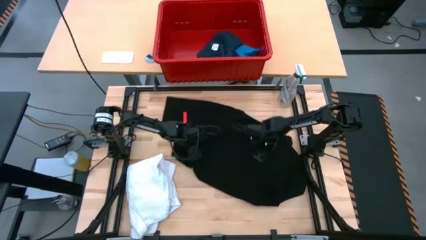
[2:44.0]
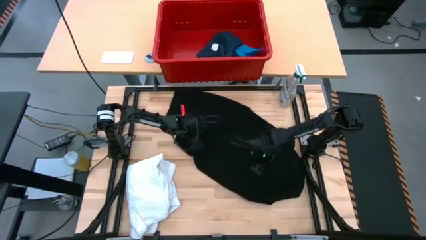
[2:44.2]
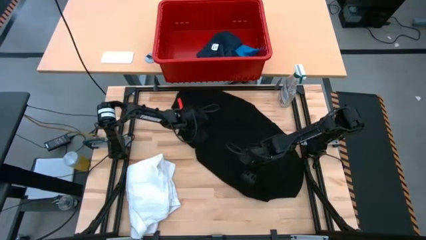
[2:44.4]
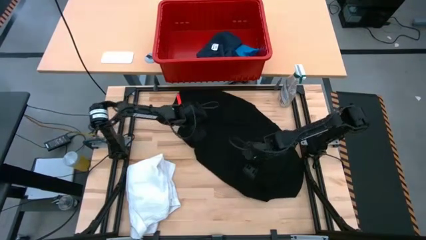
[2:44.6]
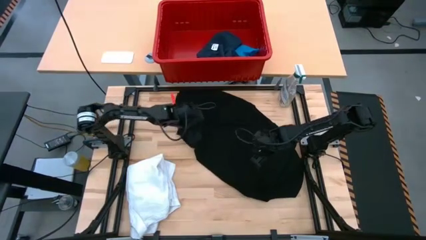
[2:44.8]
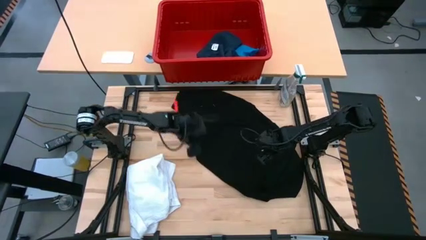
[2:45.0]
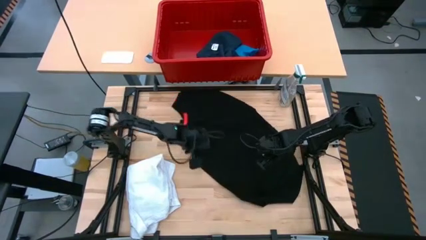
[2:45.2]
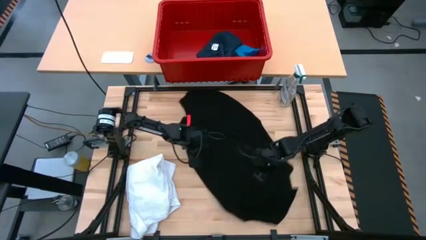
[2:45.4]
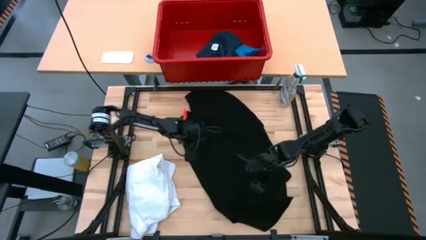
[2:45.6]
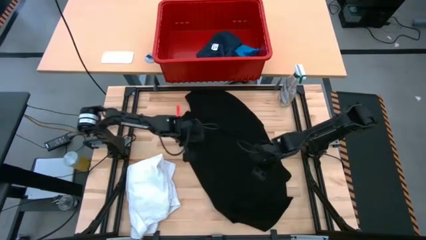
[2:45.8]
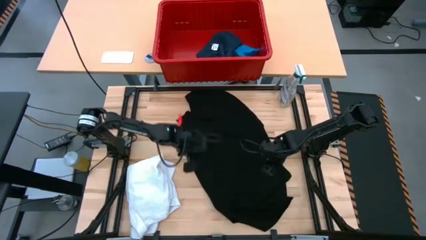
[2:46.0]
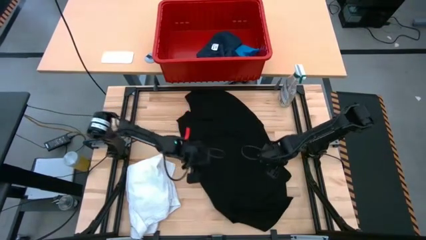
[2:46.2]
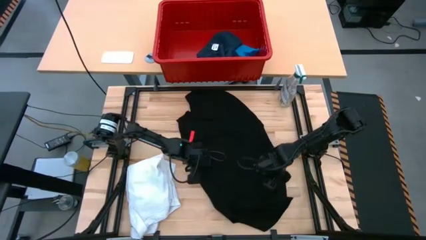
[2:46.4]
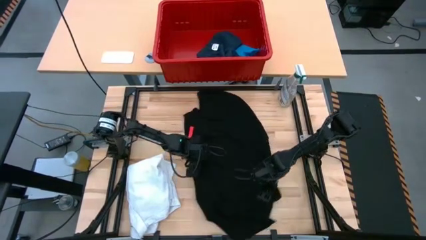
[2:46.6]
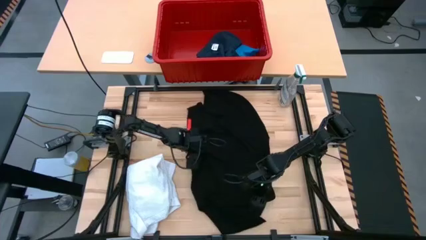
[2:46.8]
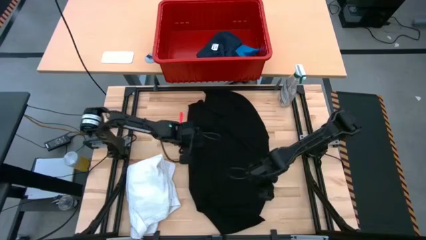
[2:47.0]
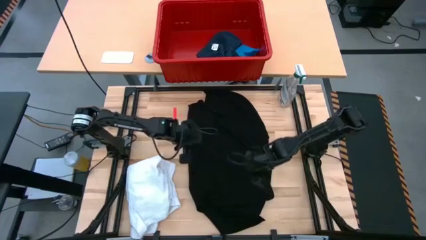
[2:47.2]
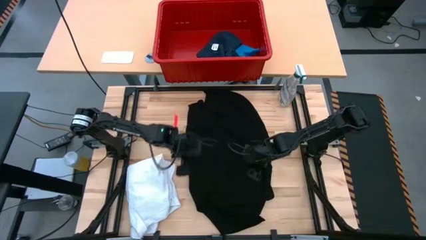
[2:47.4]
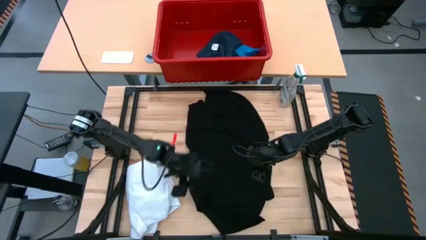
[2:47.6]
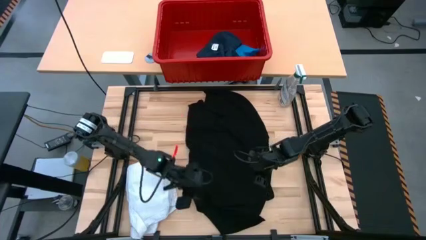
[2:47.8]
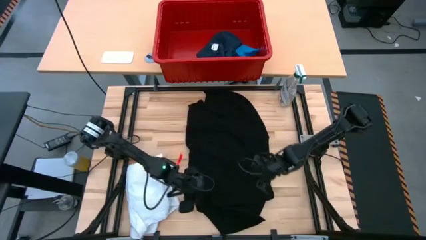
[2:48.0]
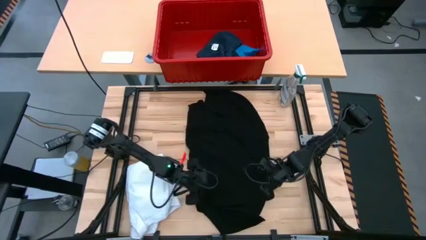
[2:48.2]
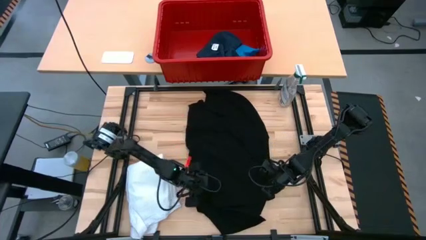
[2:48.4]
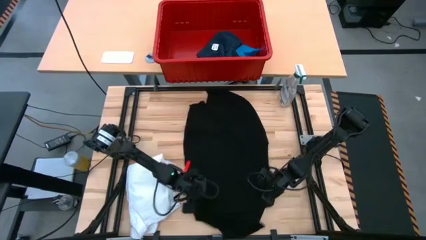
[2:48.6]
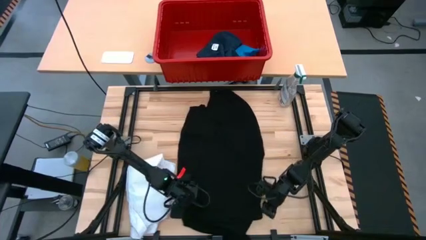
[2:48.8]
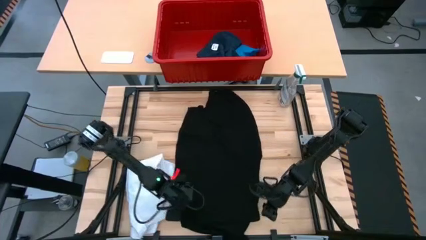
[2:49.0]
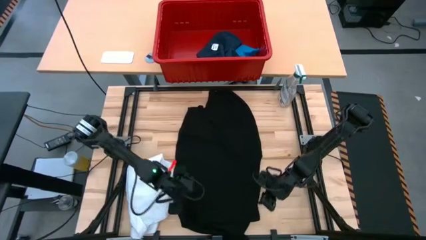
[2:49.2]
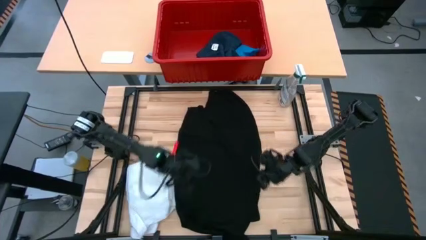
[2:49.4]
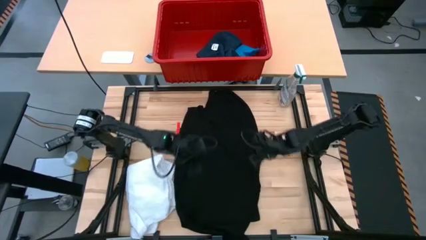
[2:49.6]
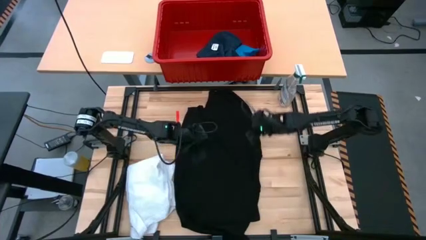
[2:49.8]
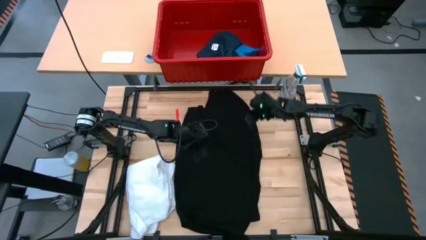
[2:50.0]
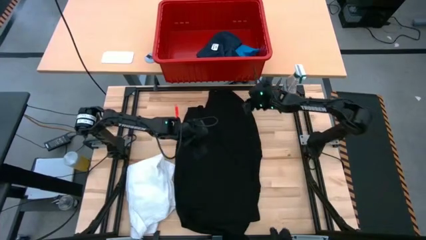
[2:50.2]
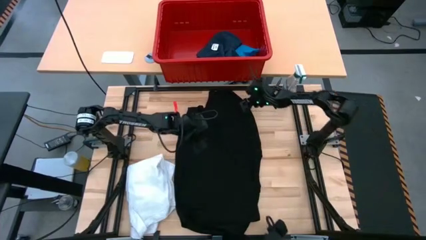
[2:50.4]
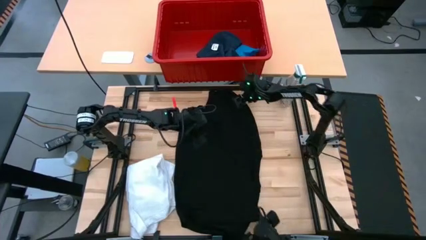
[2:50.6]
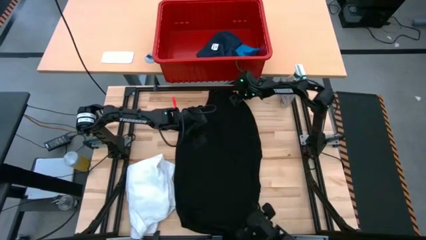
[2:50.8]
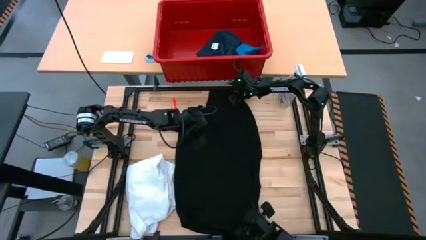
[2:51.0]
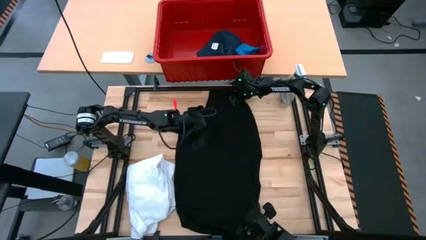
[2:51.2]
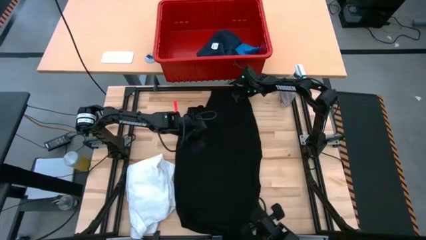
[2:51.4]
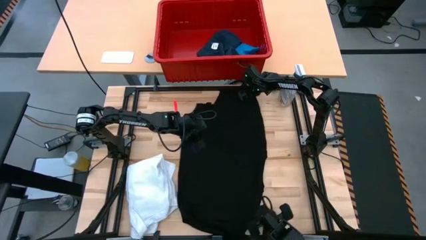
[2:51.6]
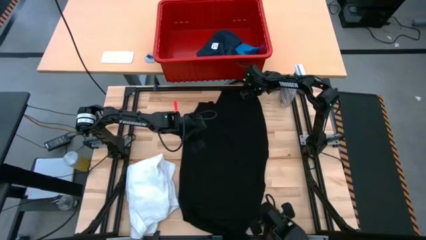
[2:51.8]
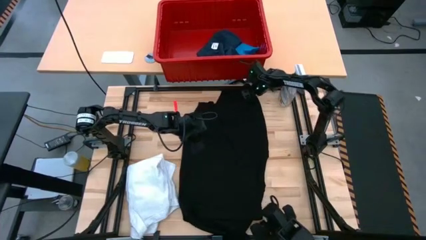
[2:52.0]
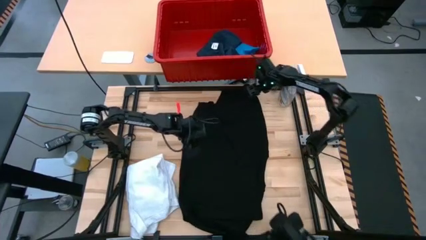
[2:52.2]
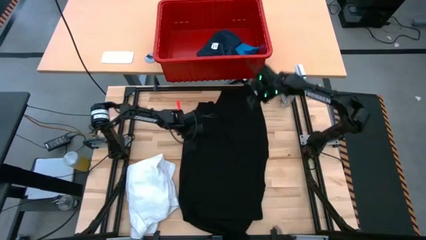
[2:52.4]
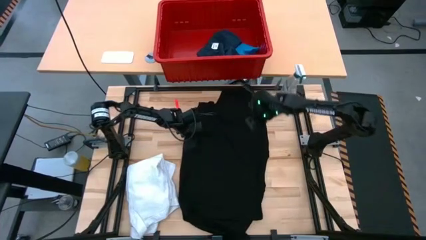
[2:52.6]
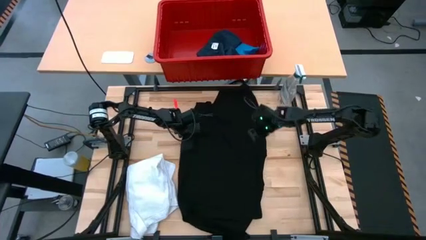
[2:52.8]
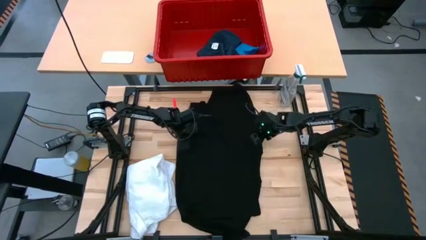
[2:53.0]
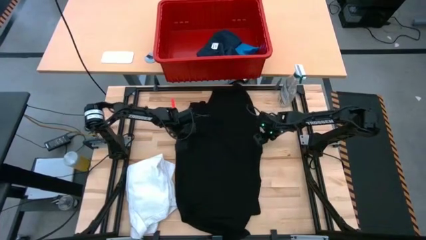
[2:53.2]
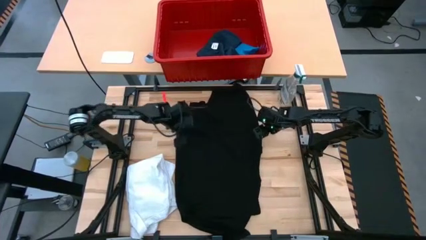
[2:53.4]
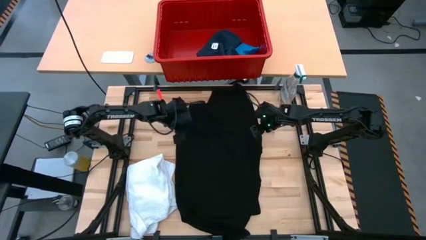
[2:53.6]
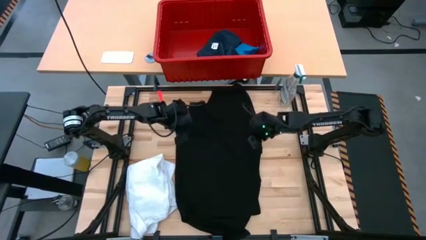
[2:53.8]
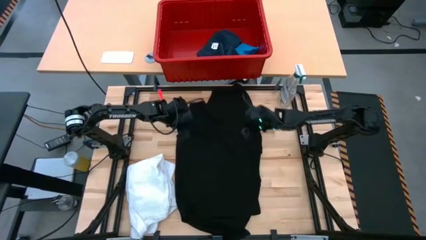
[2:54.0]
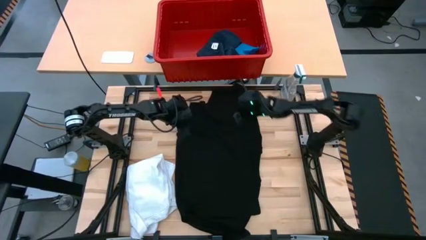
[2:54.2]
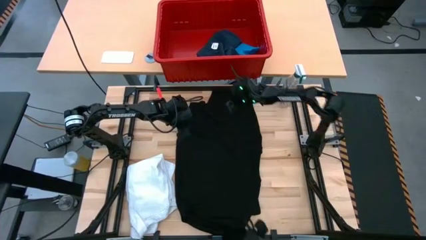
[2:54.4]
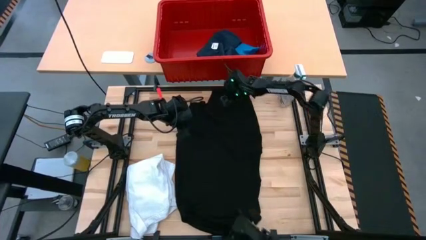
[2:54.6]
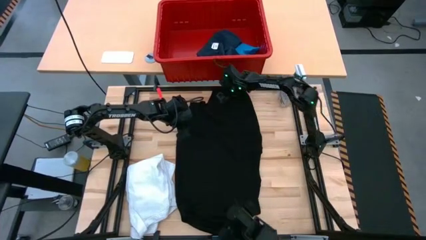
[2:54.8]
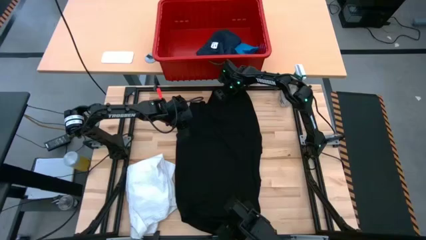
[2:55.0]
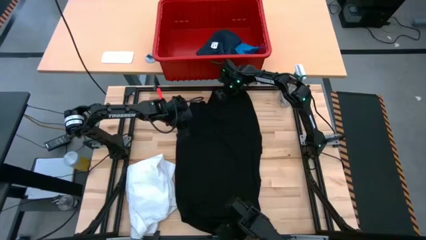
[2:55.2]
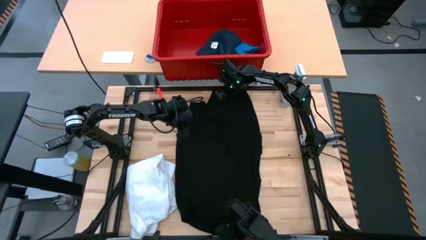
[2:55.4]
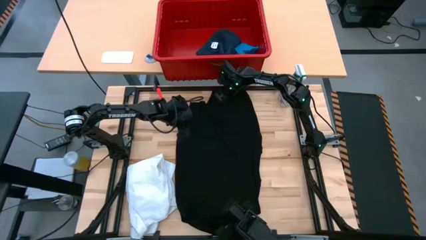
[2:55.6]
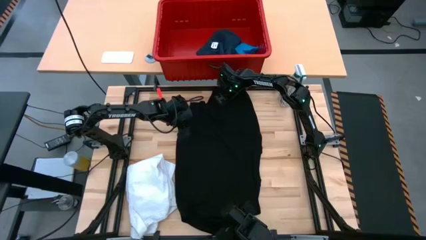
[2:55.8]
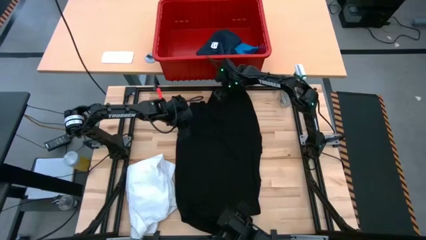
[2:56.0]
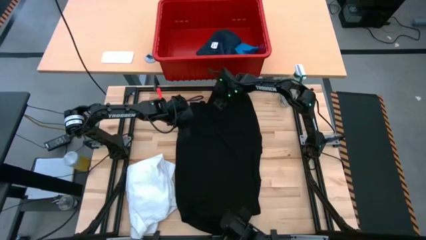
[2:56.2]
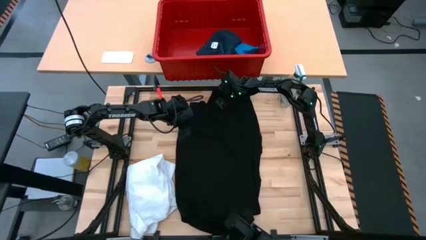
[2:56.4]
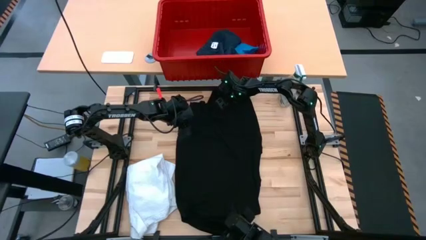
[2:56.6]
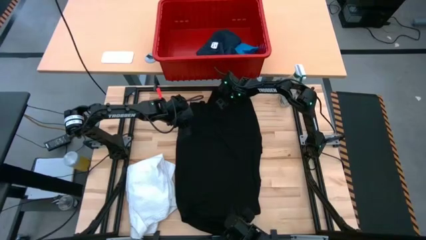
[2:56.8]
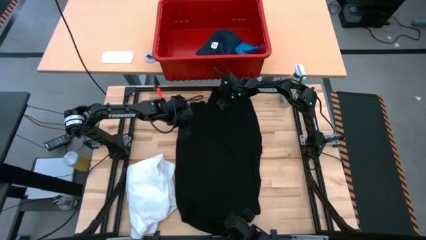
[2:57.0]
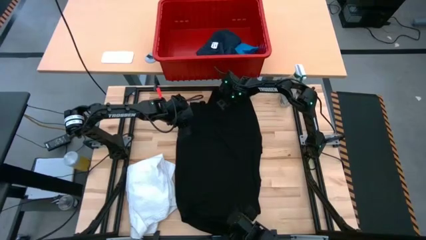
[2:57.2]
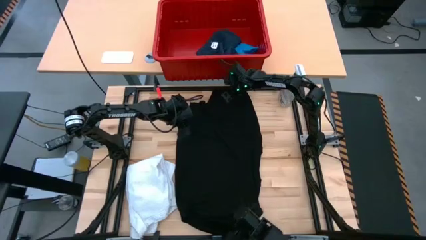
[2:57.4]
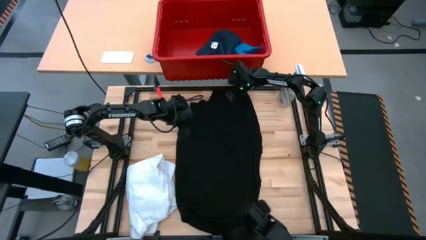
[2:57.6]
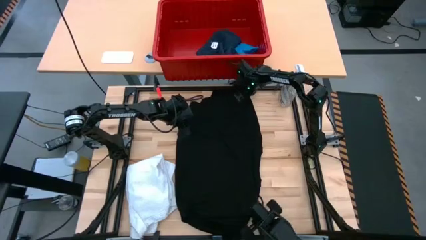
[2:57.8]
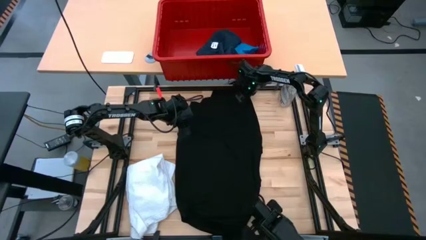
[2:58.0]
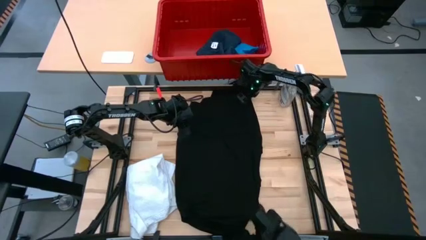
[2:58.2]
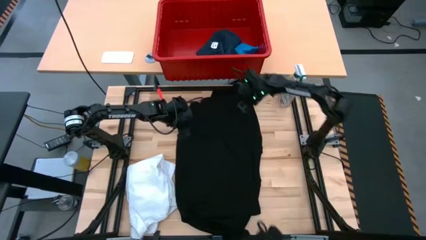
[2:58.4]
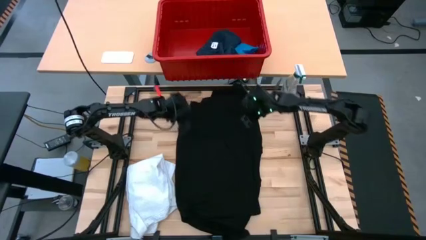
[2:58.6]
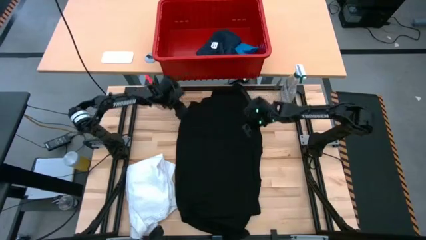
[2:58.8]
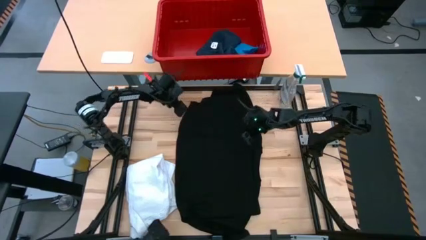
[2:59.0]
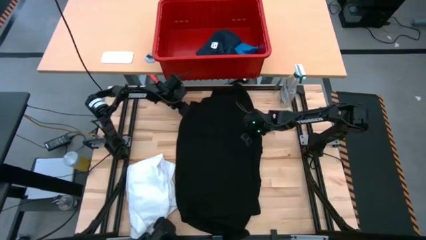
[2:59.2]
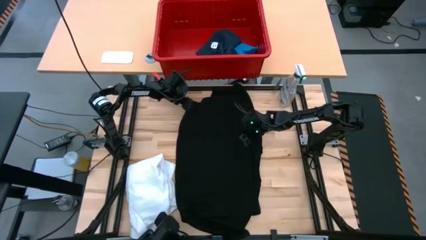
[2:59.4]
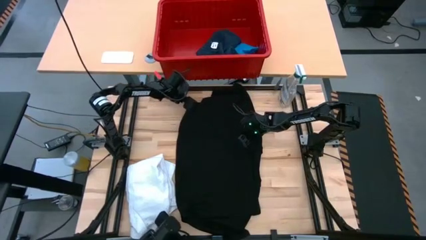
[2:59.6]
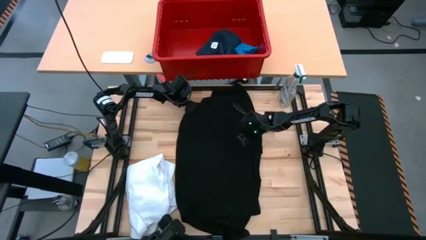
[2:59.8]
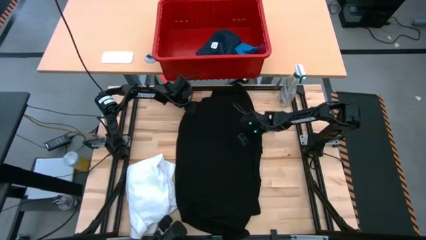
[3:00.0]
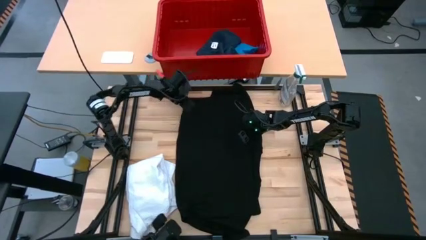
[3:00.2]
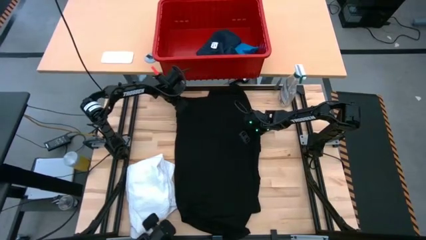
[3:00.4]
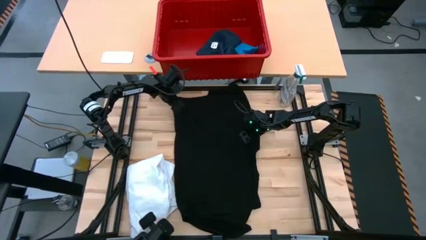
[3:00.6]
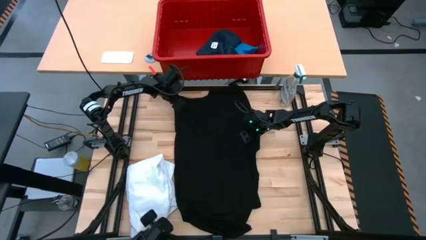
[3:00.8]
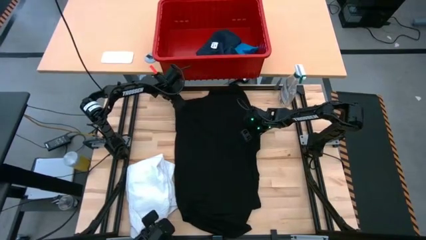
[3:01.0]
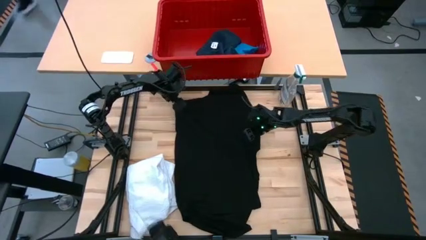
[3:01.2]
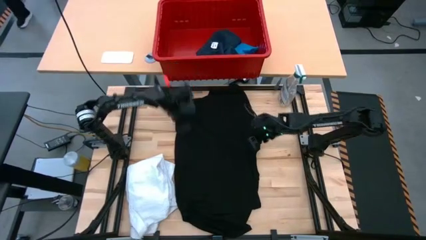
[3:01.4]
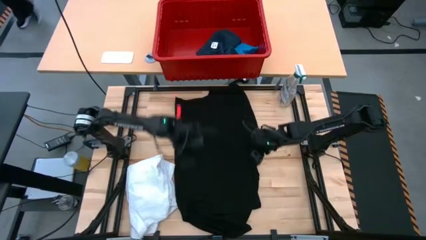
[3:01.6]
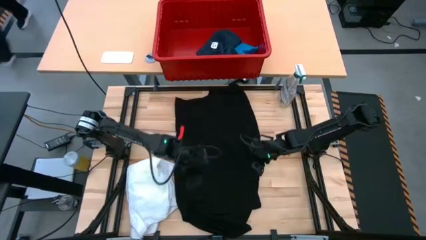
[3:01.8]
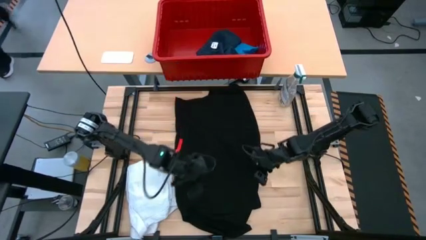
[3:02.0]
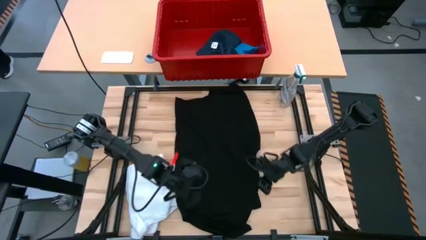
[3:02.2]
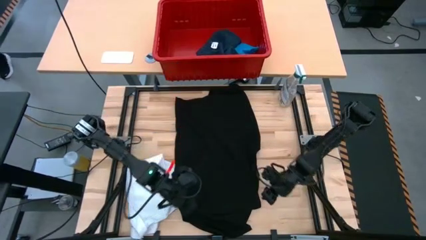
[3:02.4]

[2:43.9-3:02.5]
Task: Fold Laundry from Bin
Fold the black shirt
